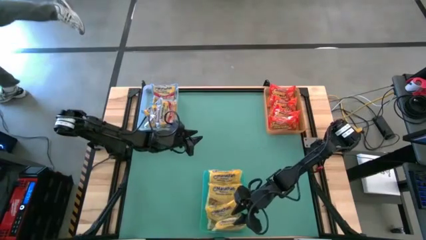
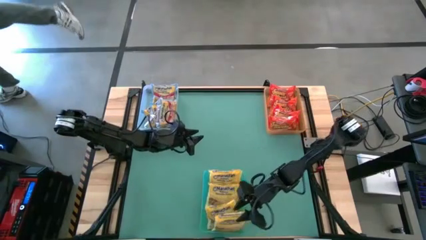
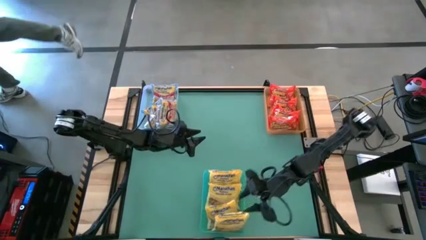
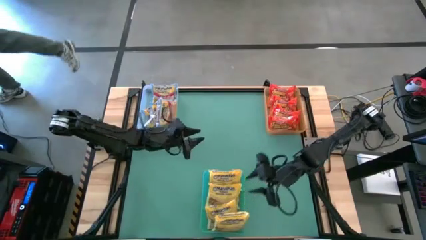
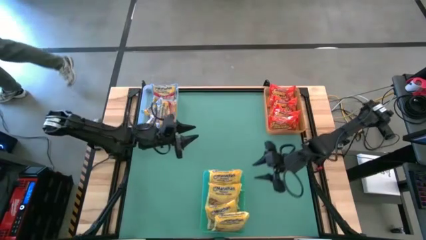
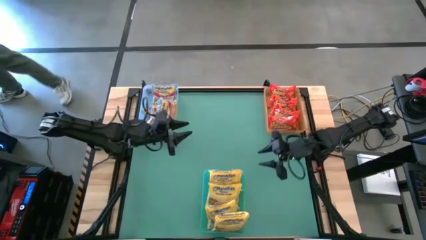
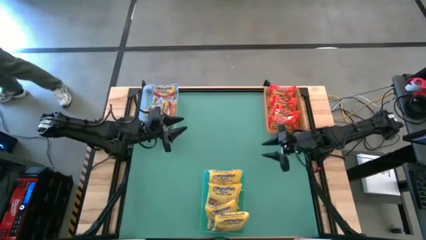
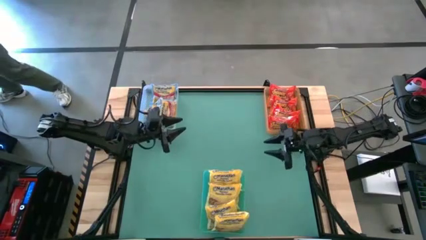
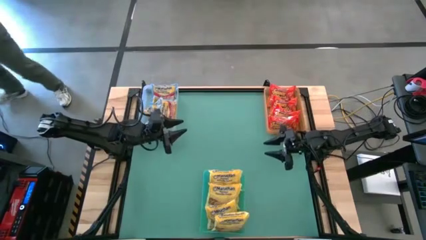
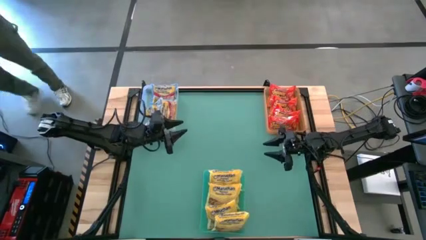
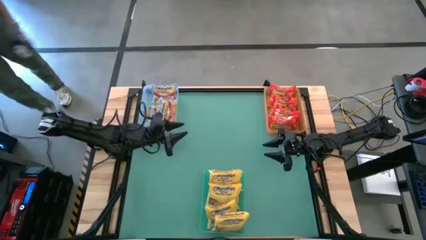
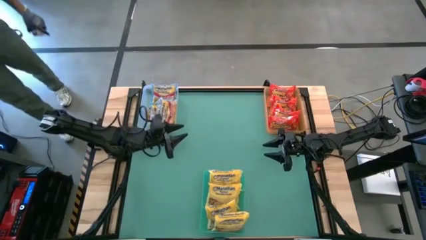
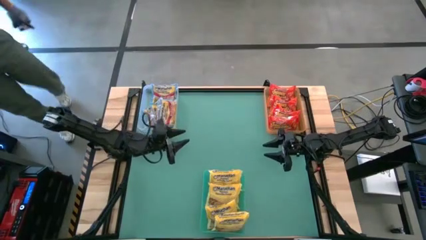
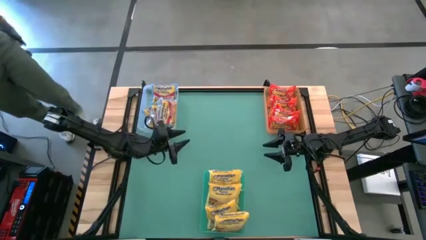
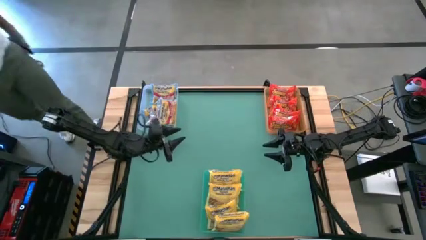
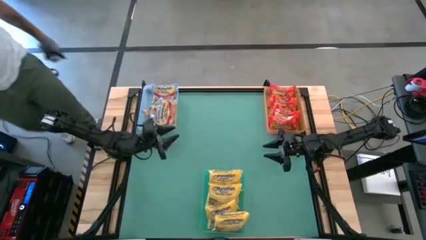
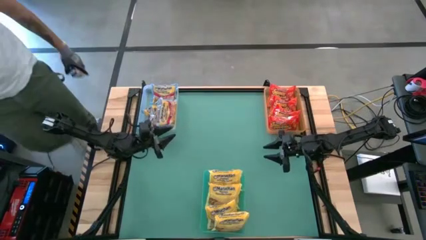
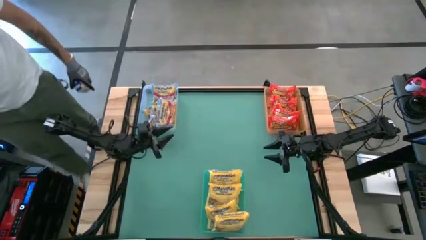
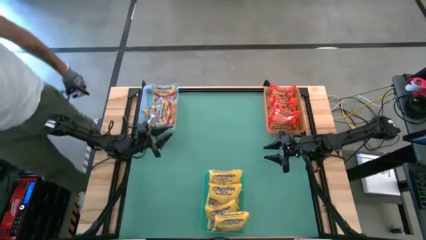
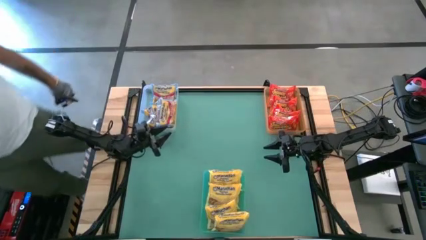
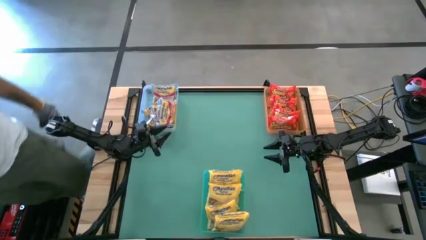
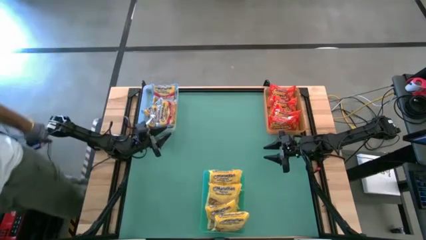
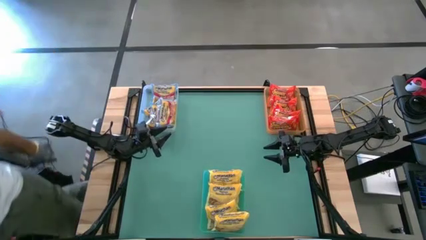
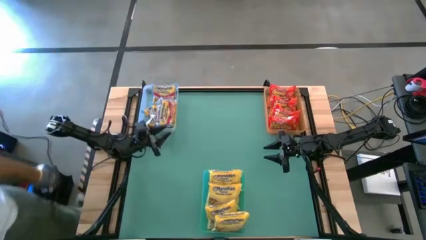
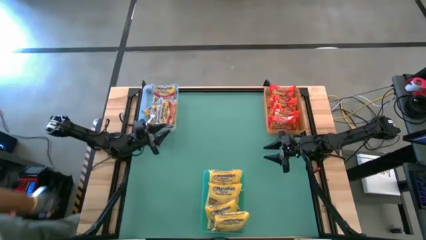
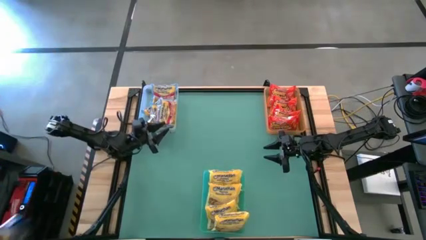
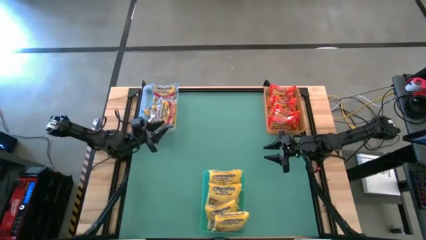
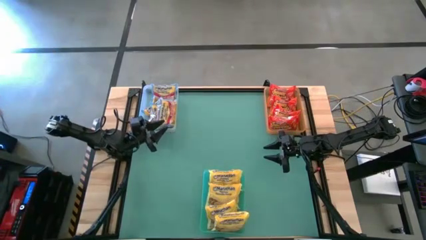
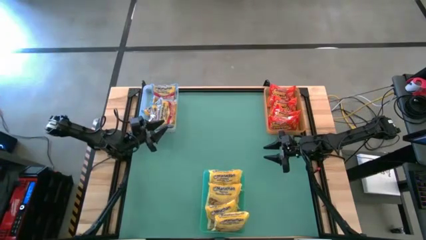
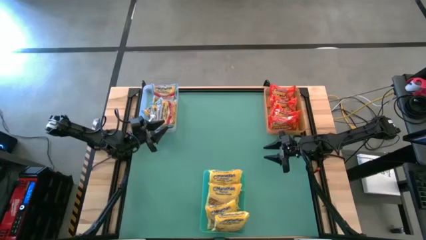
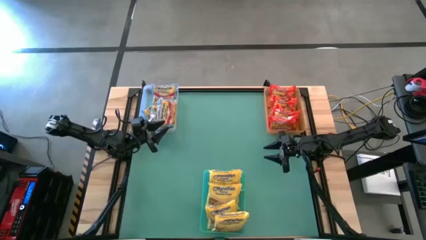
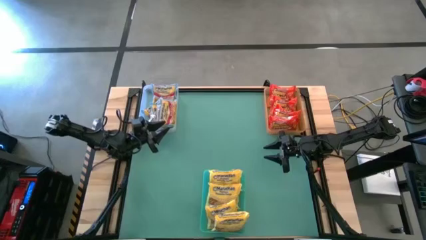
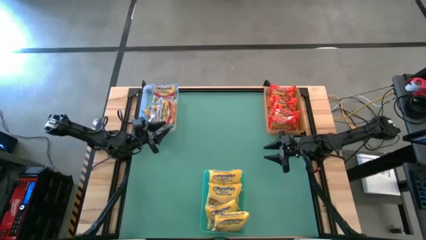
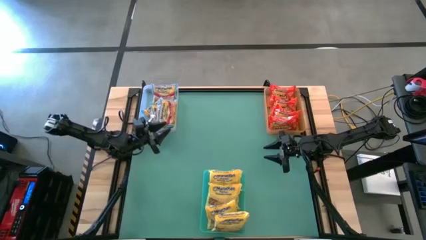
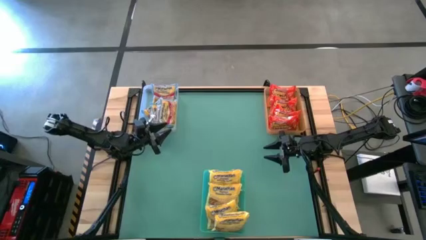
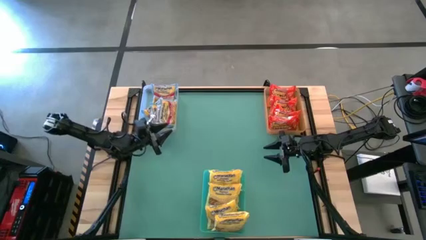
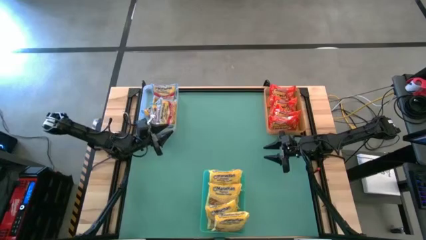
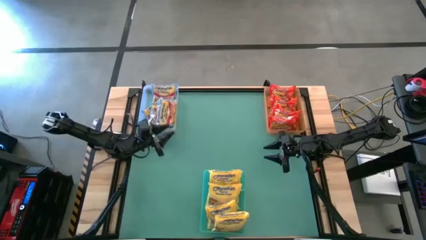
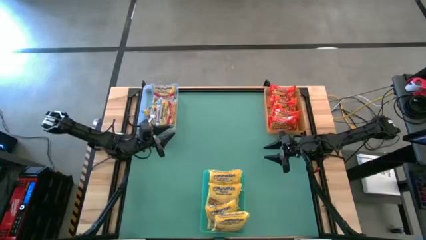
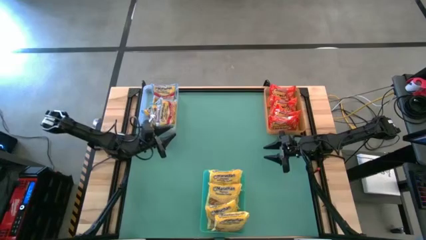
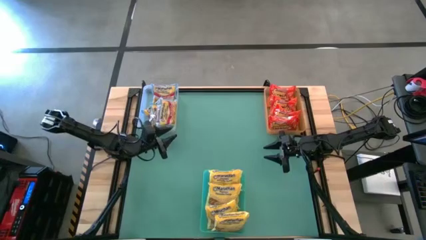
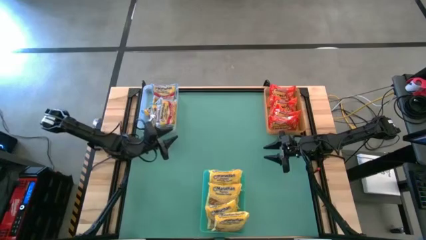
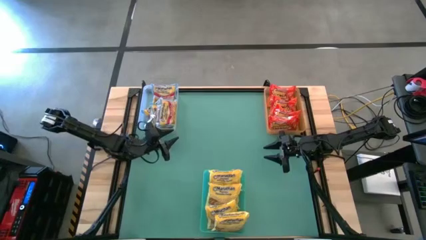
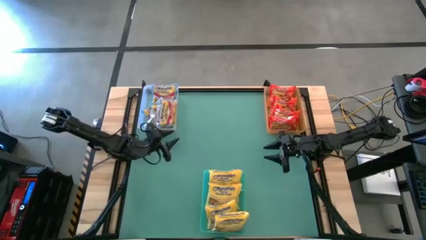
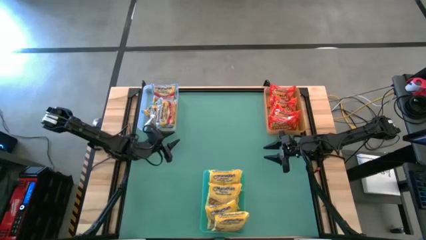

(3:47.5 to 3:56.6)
Task: Sort Maruchan noodles
Return to Home Position
